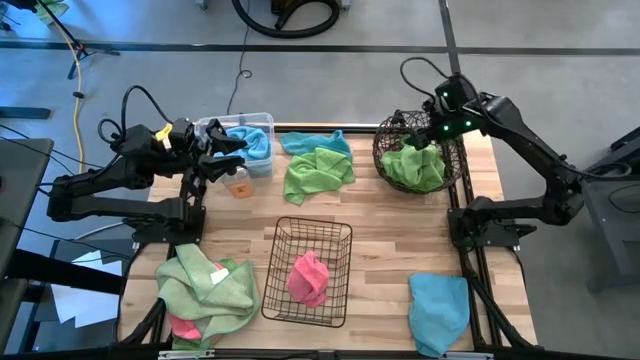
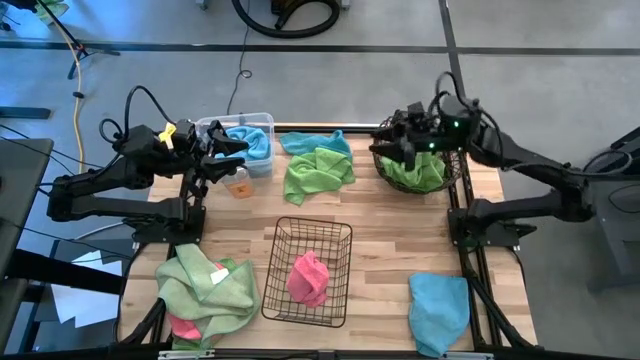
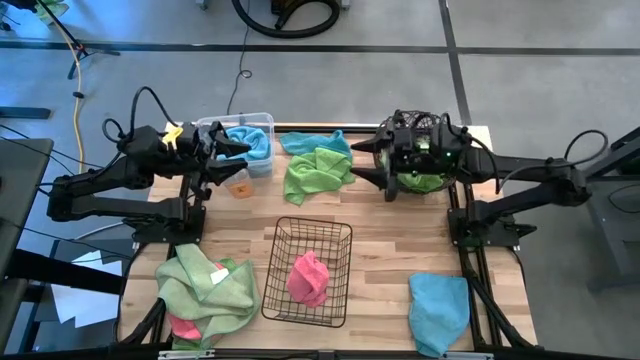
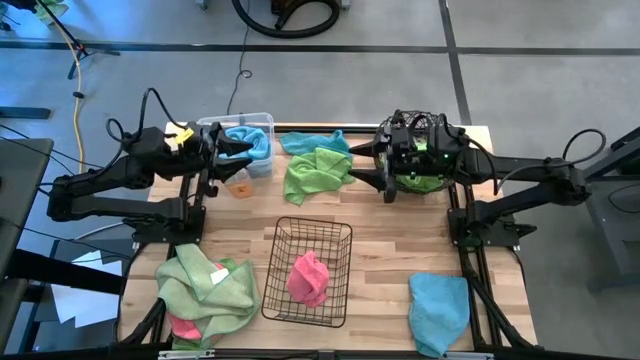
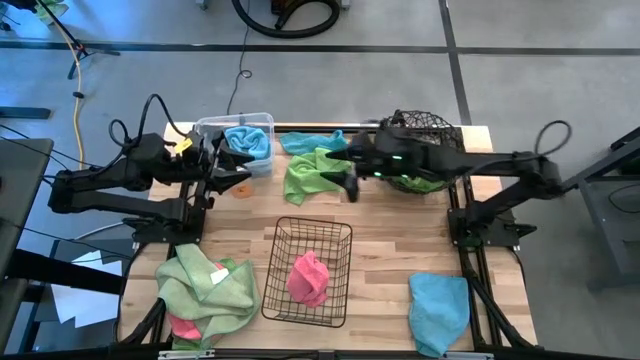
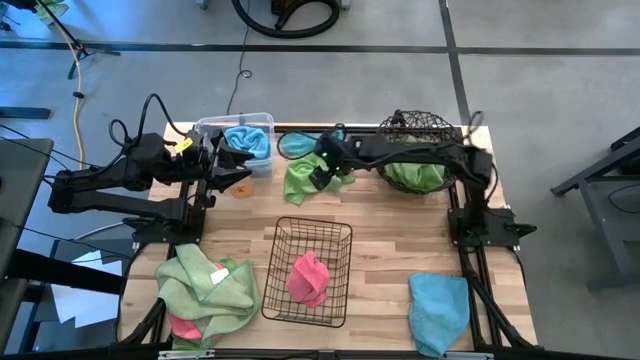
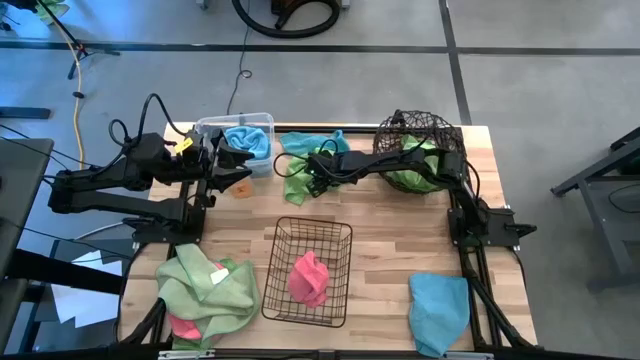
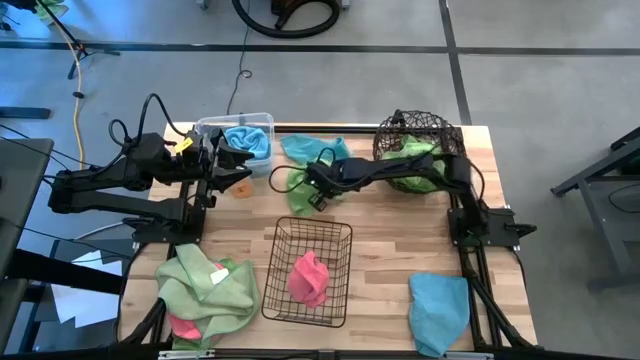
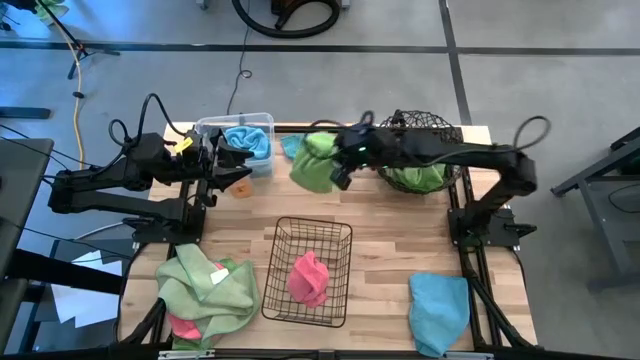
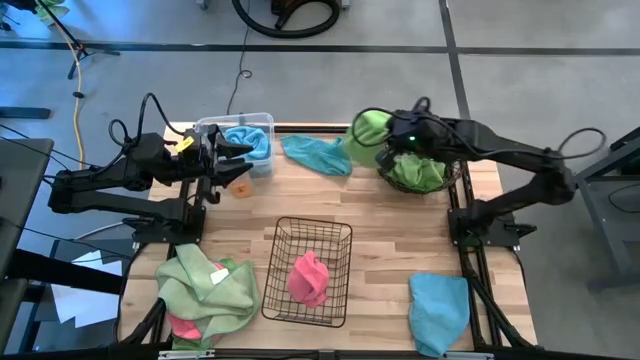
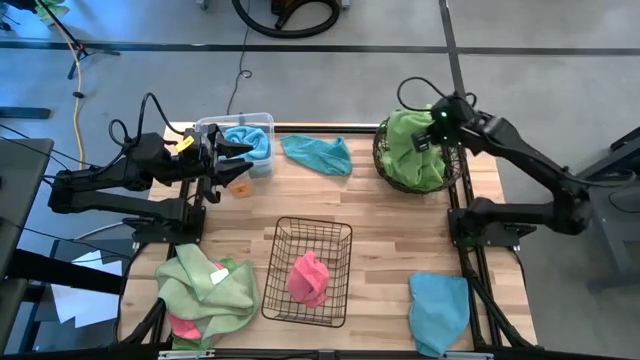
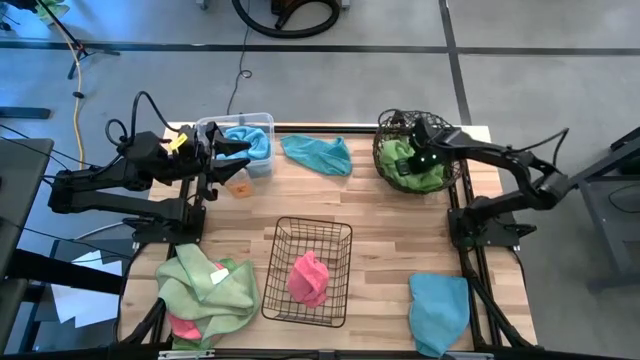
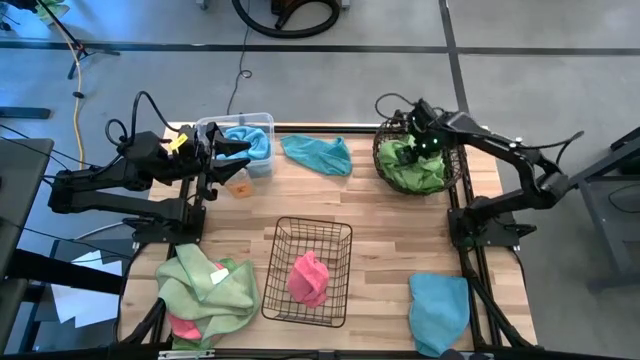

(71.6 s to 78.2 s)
Task: Sort microfiber towel by color & place in baskets
Put the green microfiber towel into the round black wire basket

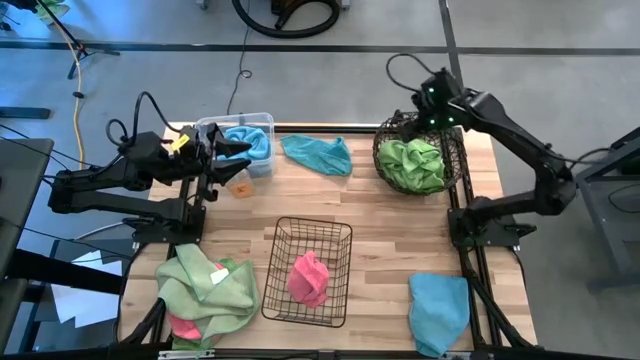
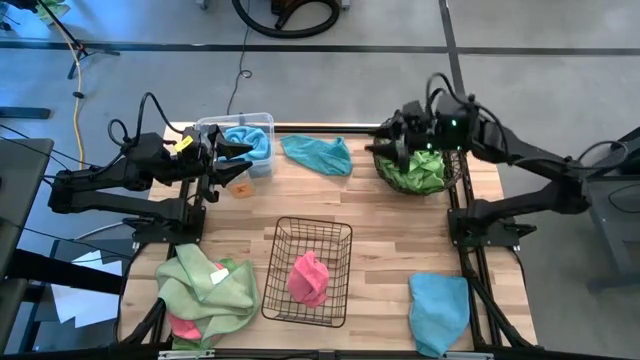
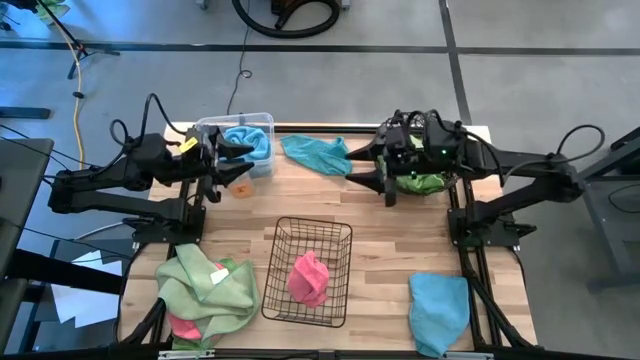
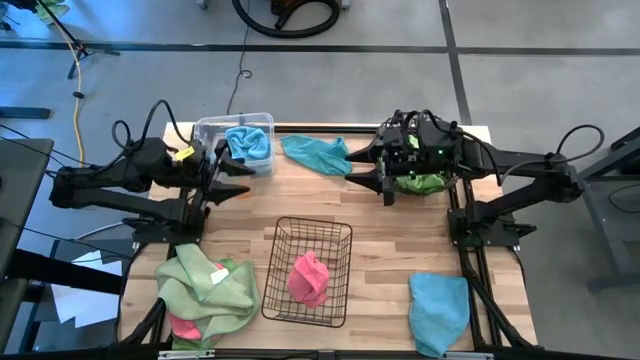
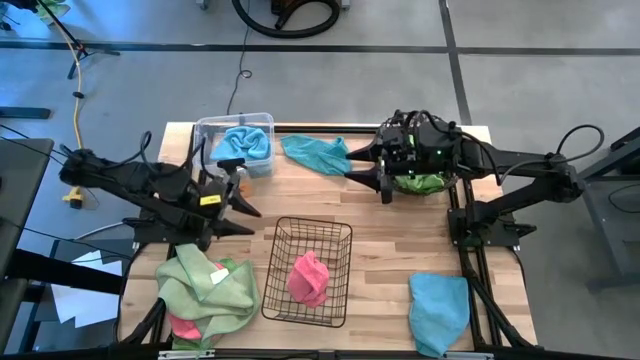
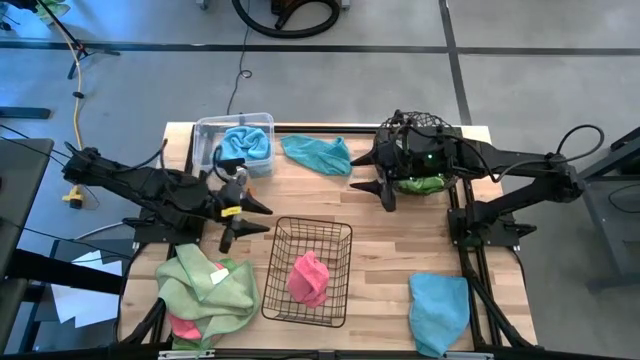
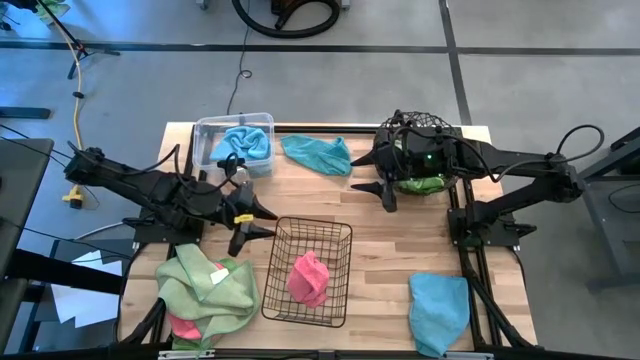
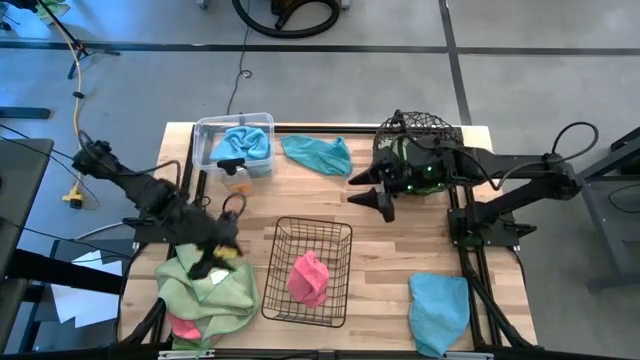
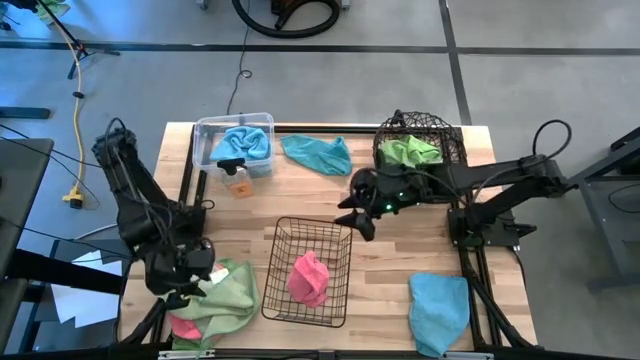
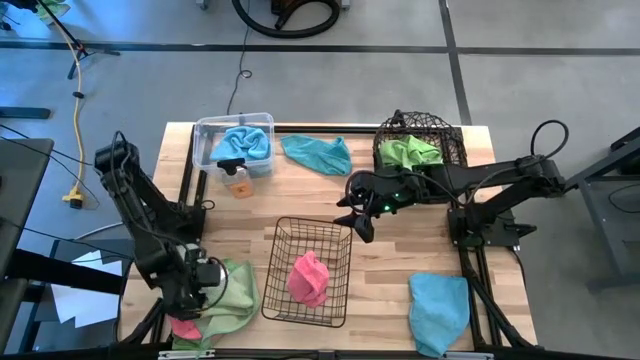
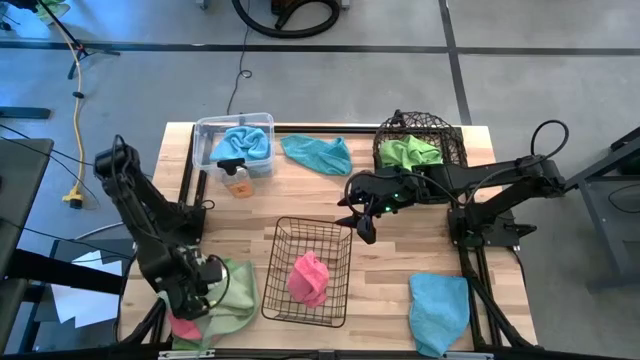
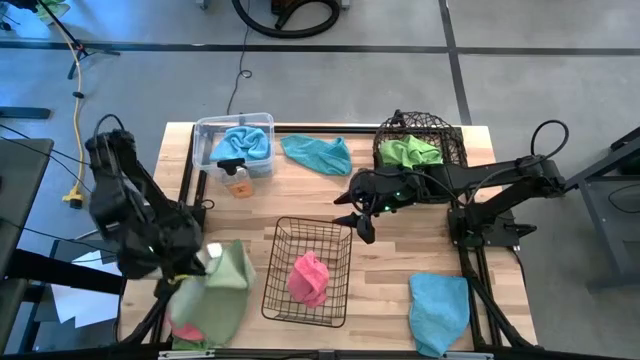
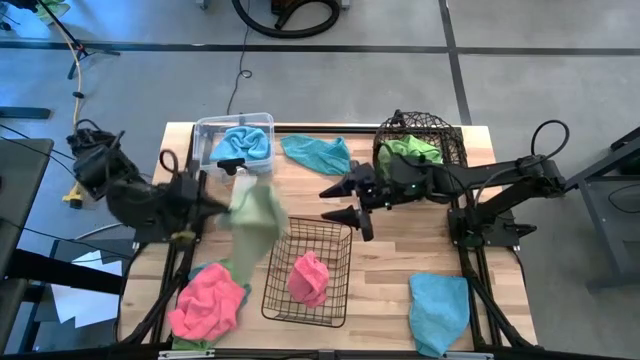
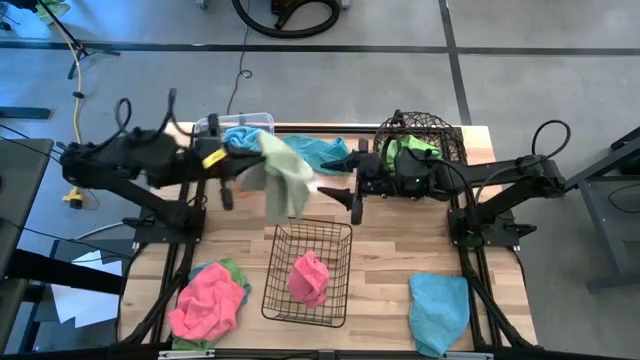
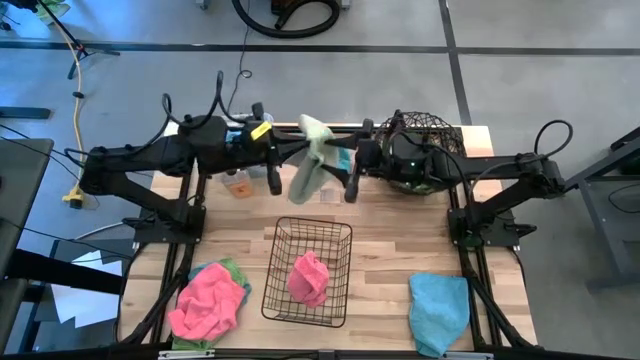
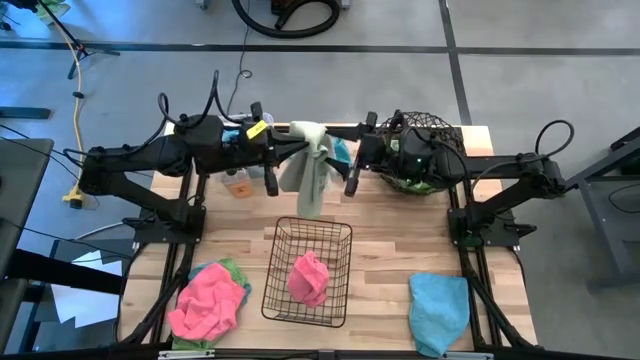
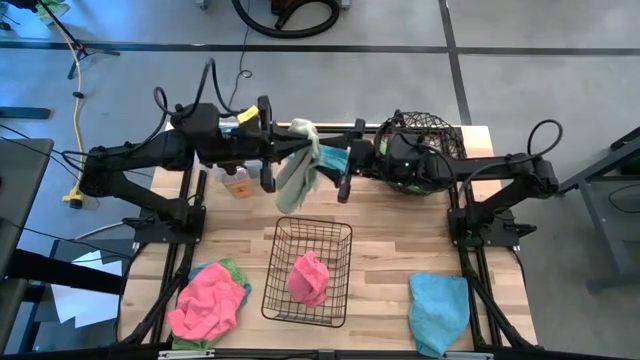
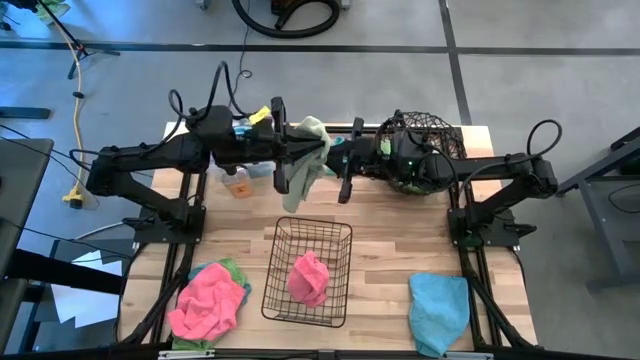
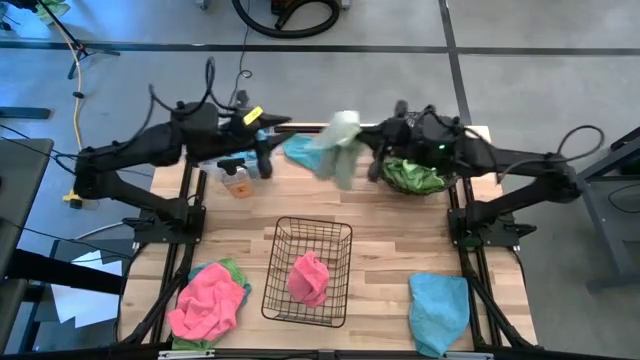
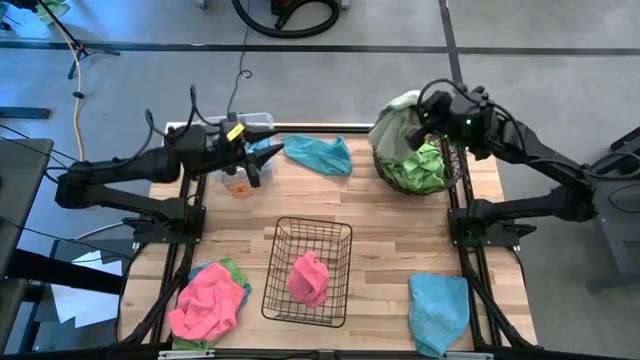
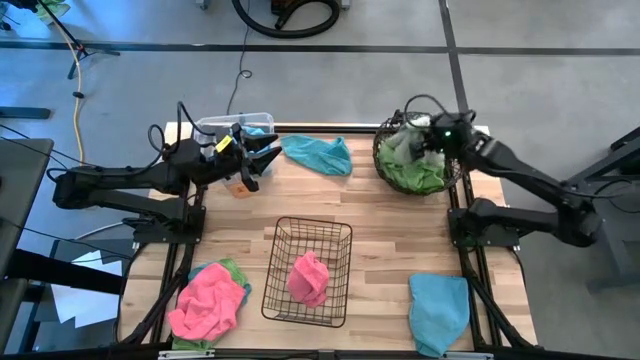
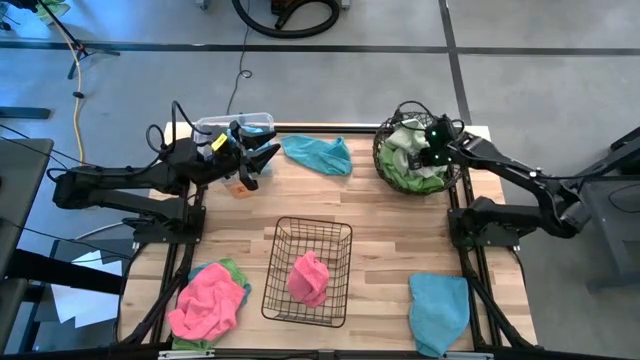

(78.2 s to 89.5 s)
Put the light green microfiber towel into the round black wire basket

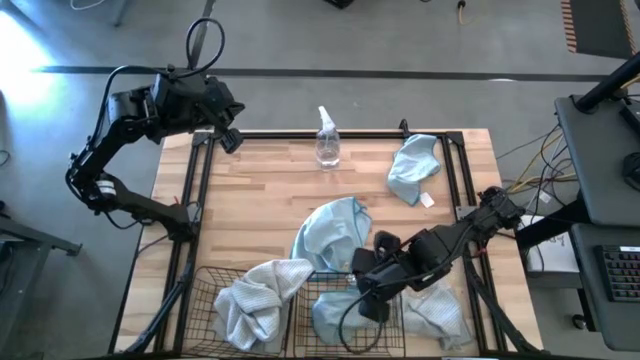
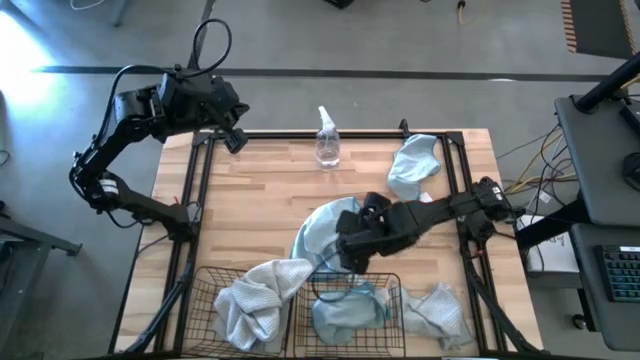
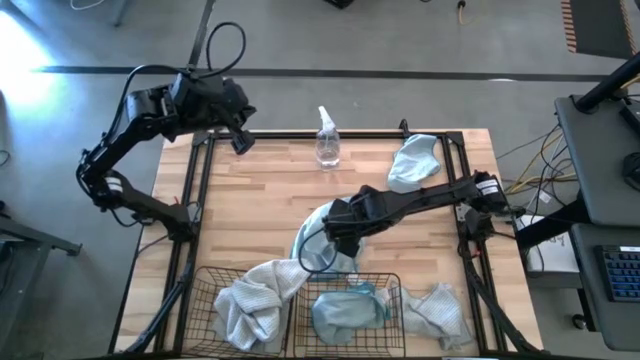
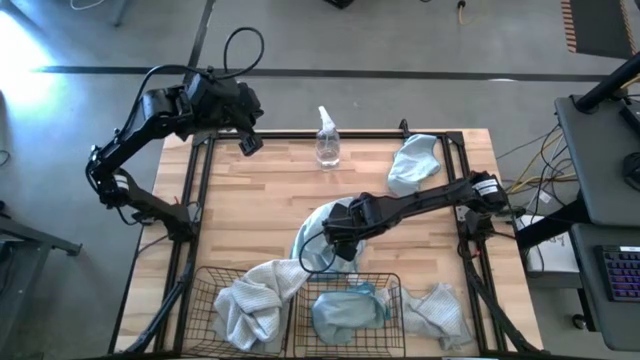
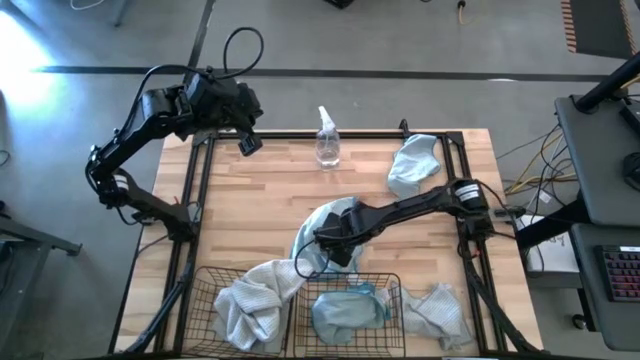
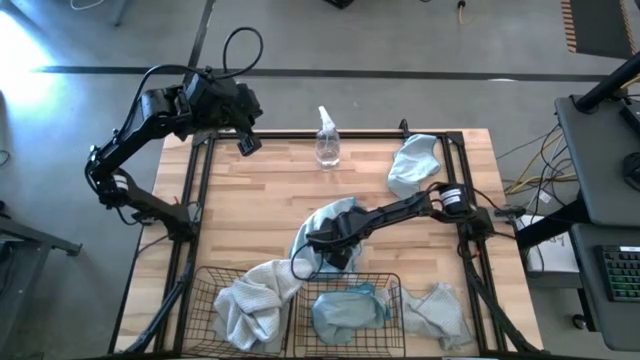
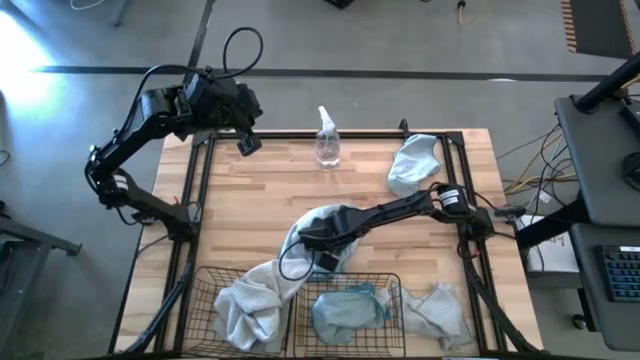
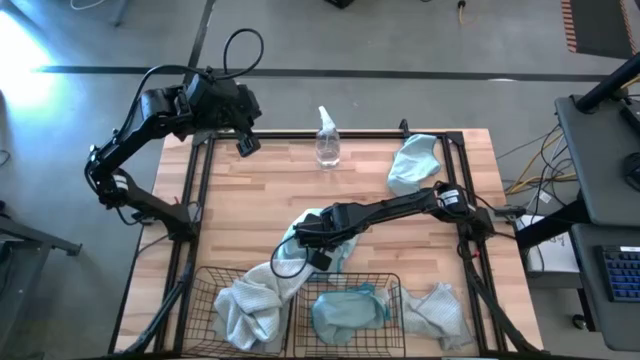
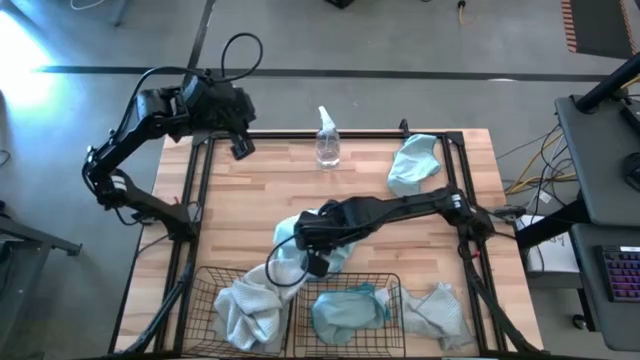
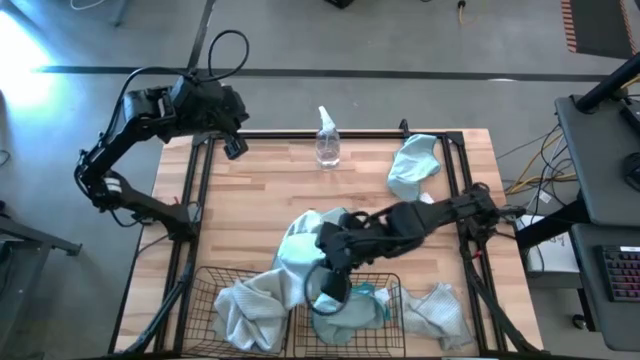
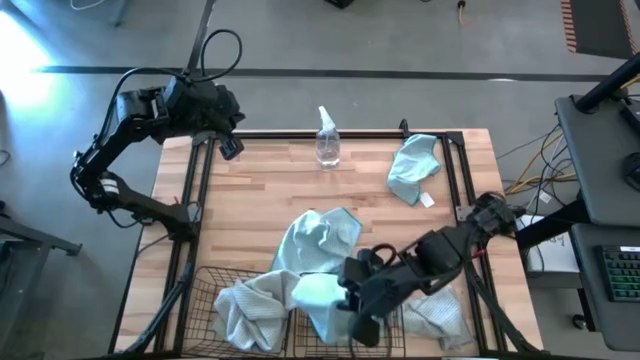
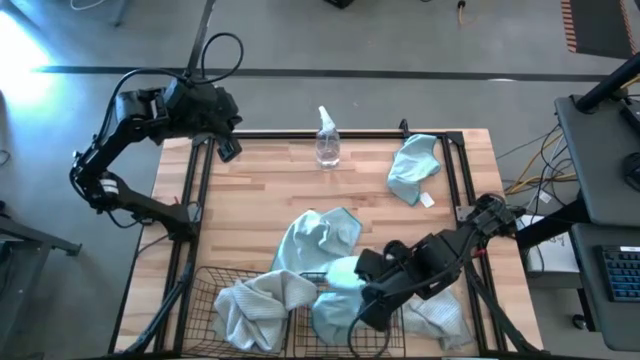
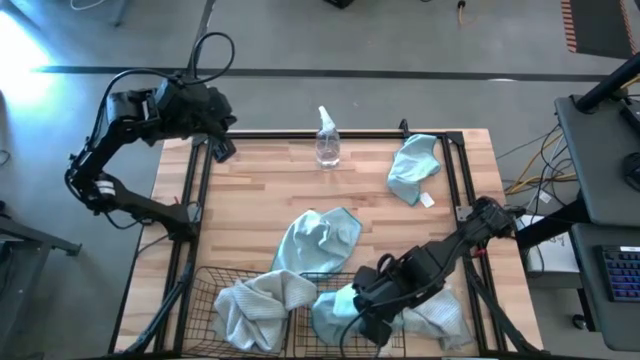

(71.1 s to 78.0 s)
Task: Sort microfiber towel by color & place in baskets
Put the bottom blue microfiber towel into the right black wire basket
